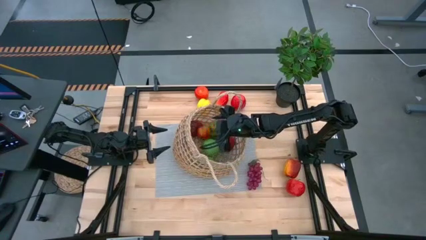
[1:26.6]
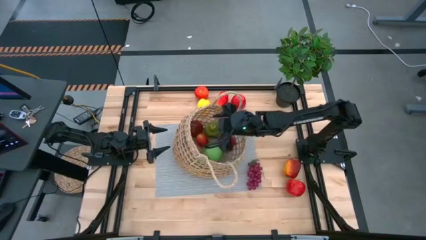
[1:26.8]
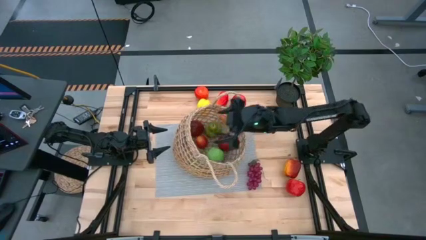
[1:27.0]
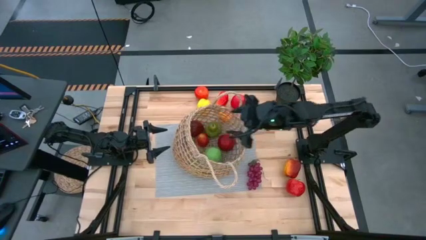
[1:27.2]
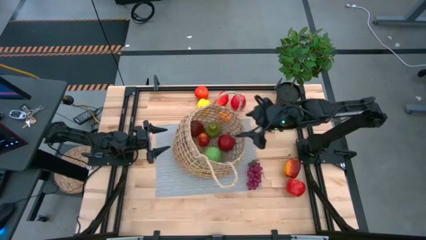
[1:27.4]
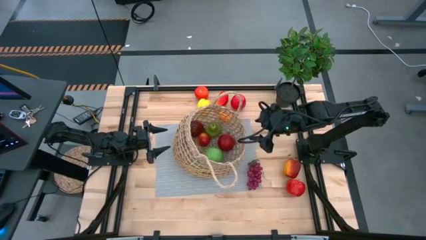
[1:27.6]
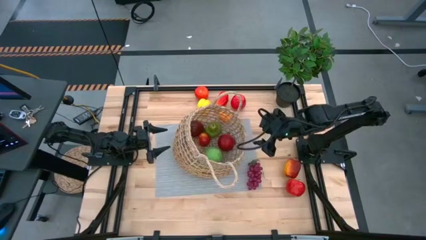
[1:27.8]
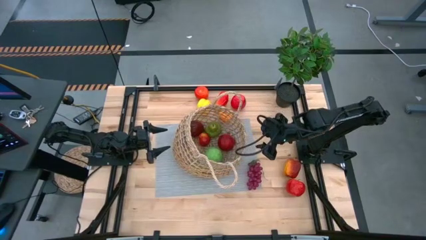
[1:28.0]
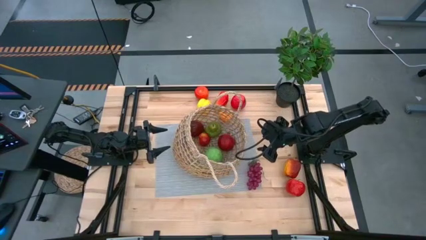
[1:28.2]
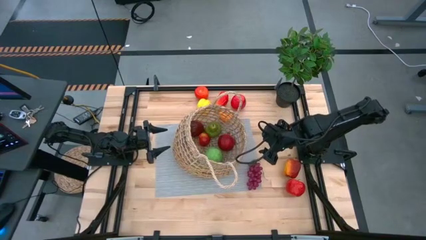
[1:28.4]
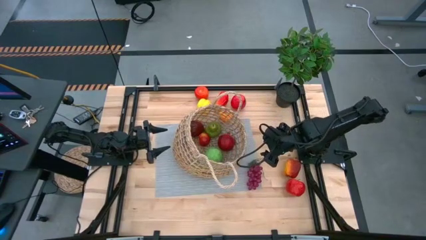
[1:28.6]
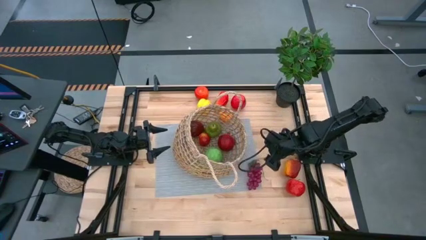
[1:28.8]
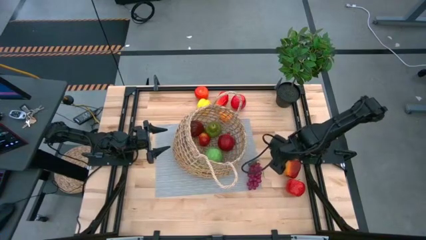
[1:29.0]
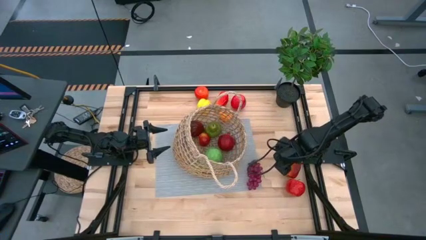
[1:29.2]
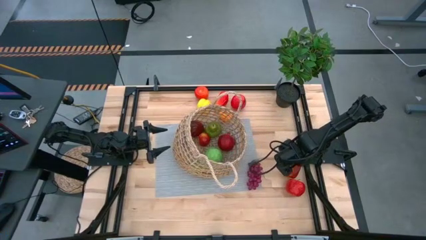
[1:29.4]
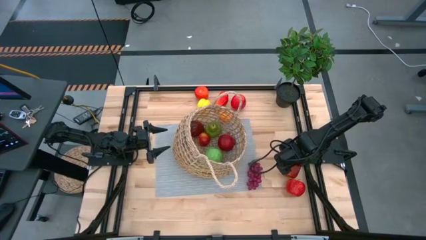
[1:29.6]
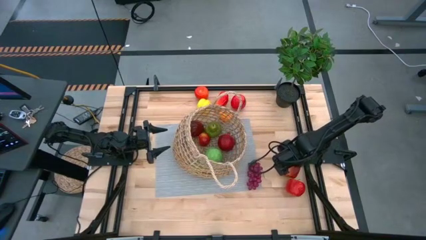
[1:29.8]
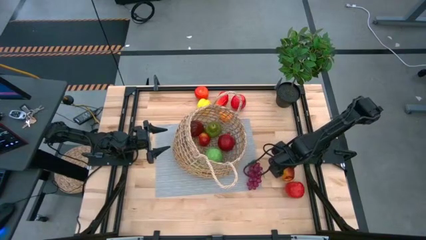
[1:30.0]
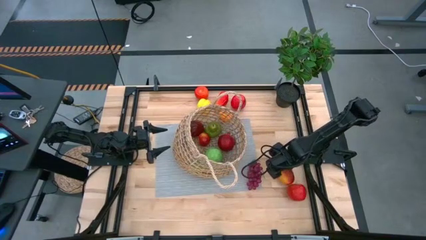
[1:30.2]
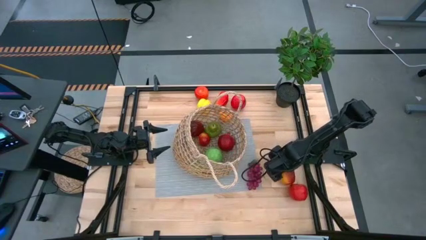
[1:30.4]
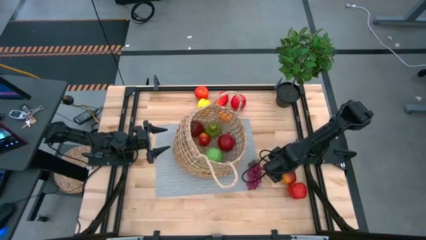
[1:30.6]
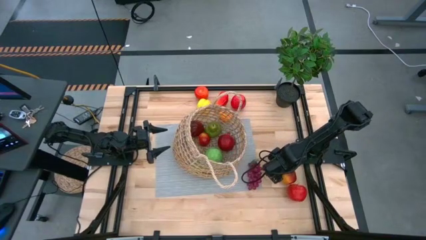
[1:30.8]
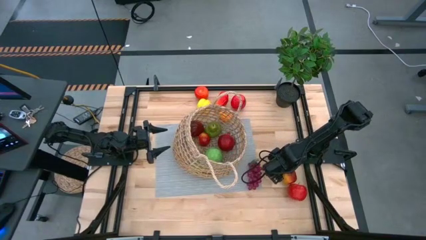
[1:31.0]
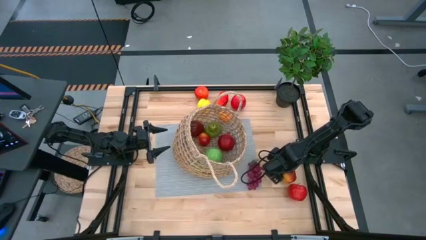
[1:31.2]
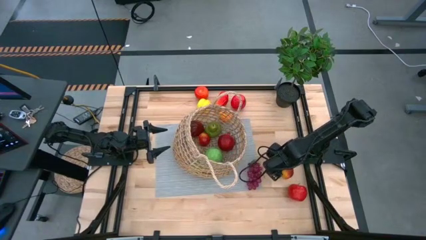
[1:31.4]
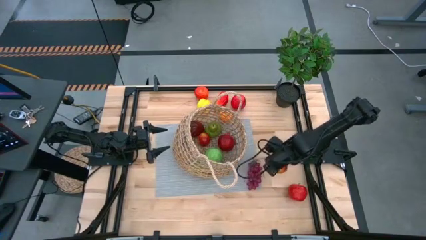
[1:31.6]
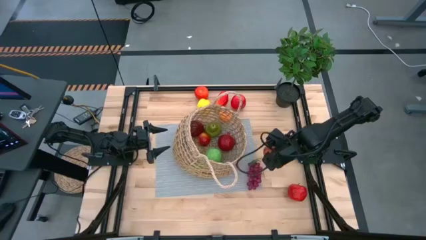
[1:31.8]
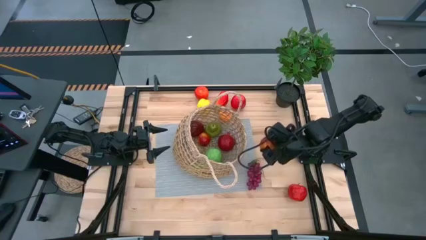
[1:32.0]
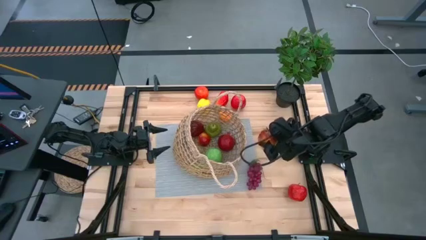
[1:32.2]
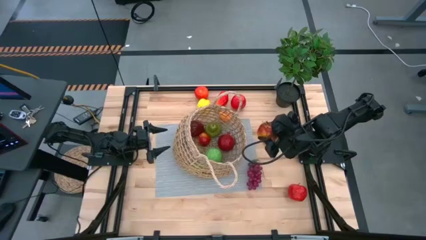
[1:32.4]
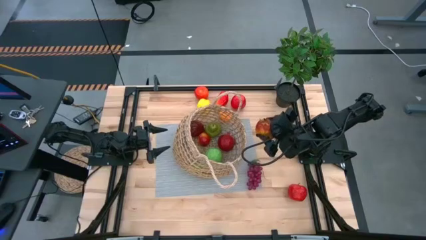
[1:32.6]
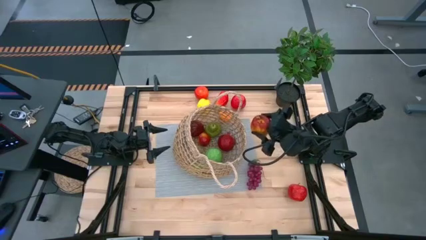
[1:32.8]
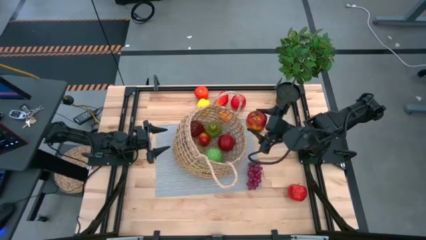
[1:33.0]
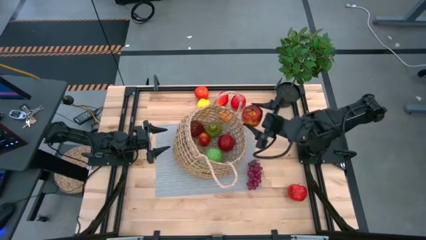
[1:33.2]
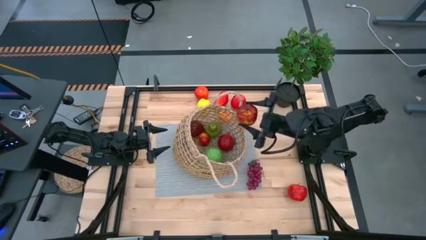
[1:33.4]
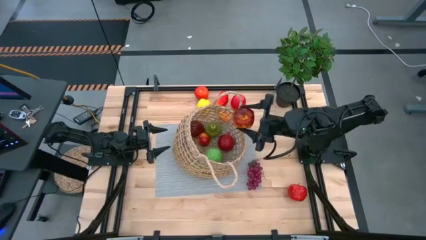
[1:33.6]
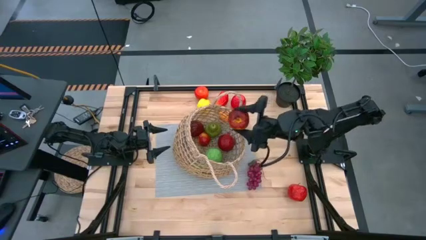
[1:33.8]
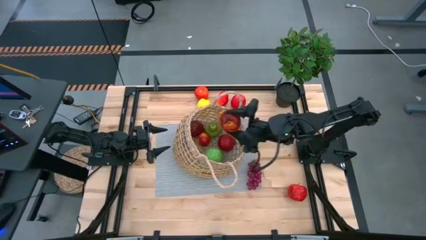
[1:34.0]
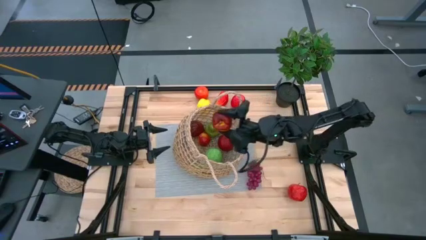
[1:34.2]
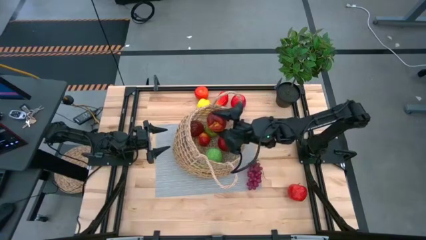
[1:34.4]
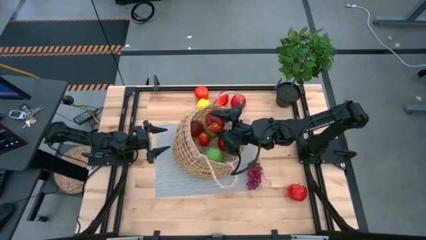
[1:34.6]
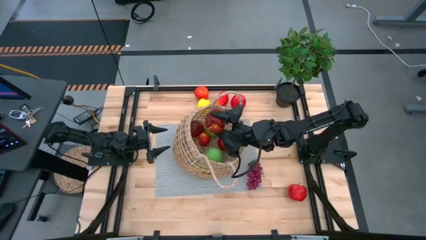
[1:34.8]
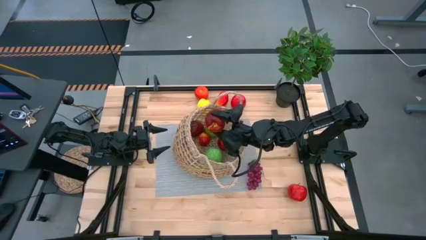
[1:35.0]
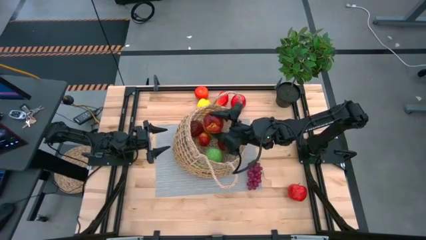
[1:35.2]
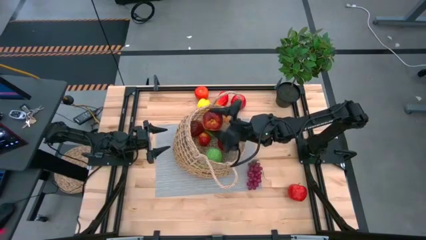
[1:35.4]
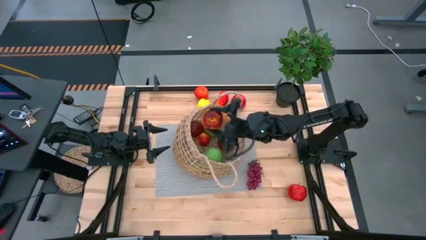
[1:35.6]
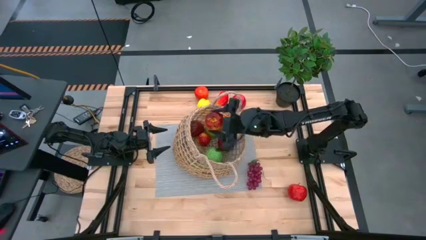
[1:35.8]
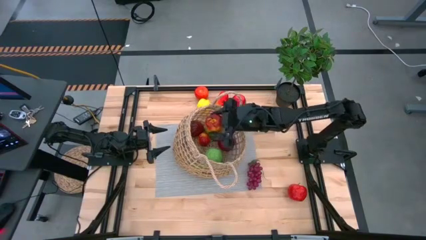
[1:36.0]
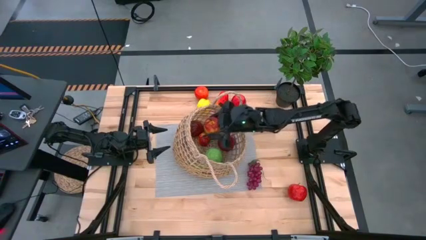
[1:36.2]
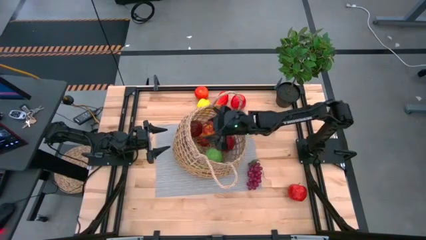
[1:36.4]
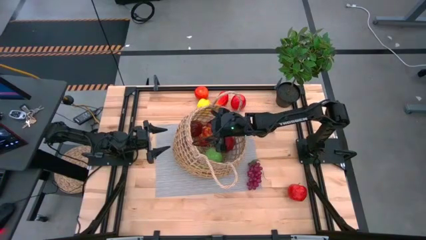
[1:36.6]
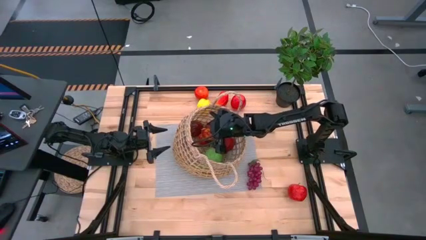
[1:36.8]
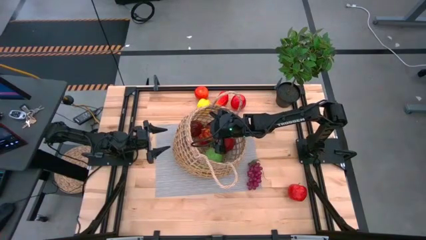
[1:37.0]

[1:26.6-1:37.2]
Task: Build produce basket
Put the center right red apple into the mesh basket

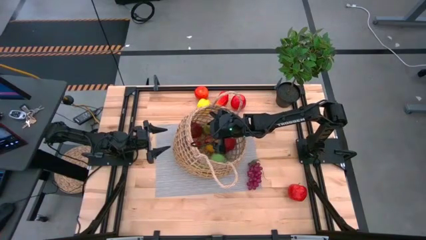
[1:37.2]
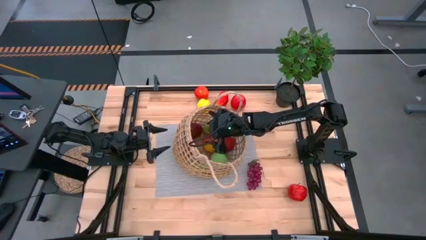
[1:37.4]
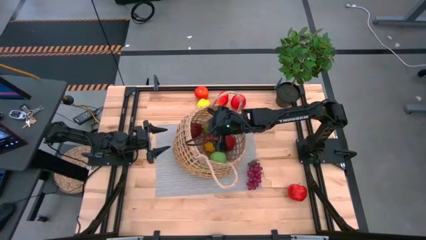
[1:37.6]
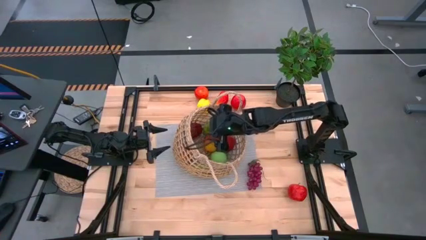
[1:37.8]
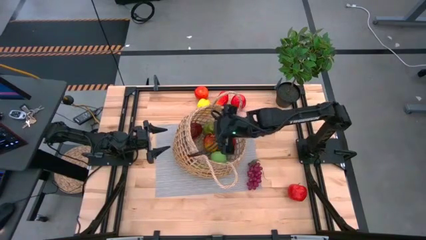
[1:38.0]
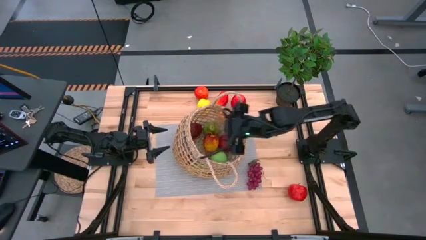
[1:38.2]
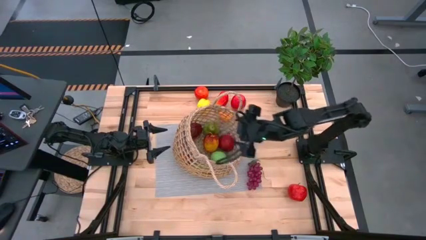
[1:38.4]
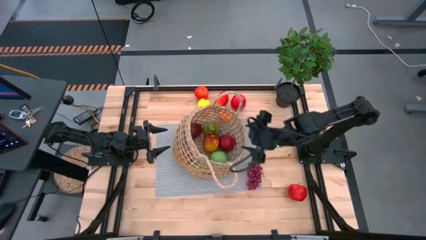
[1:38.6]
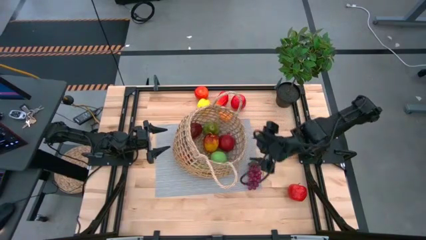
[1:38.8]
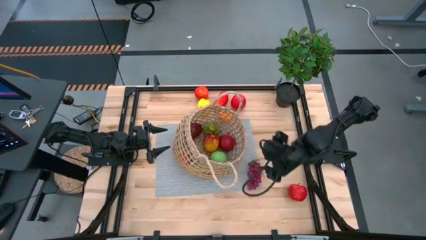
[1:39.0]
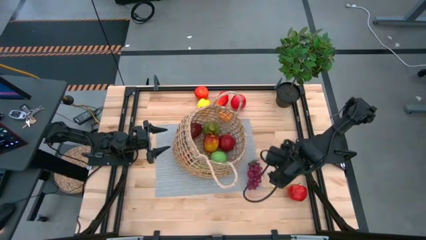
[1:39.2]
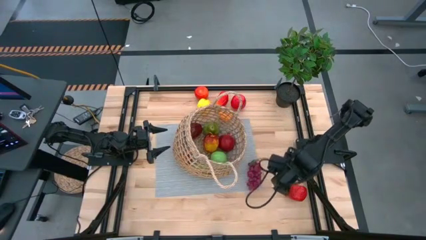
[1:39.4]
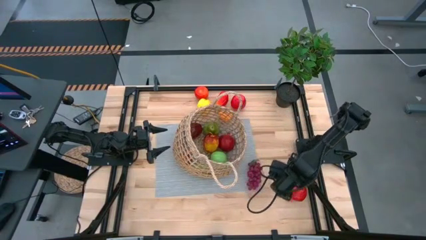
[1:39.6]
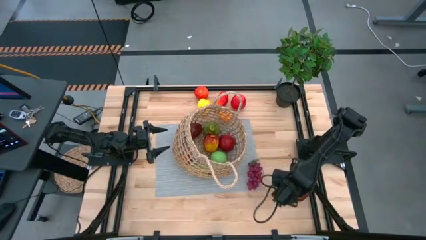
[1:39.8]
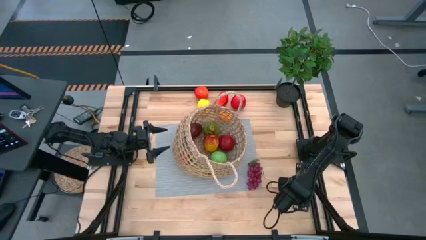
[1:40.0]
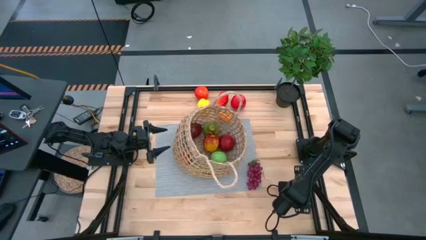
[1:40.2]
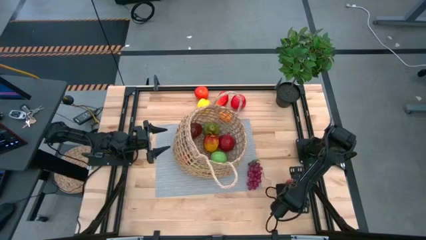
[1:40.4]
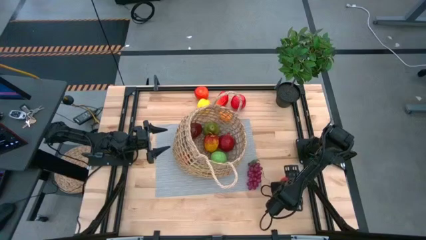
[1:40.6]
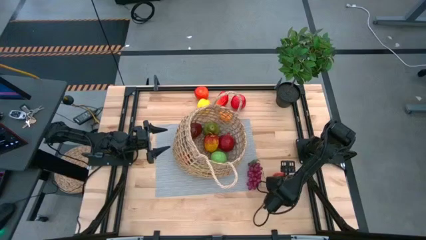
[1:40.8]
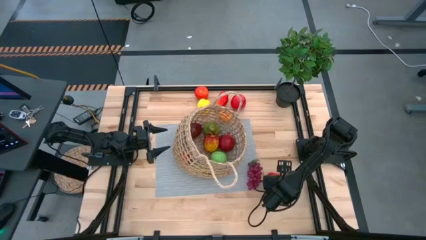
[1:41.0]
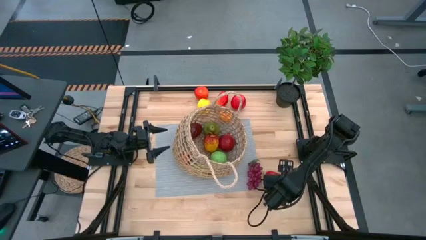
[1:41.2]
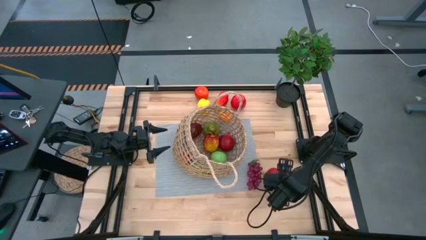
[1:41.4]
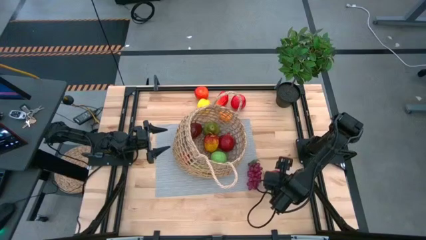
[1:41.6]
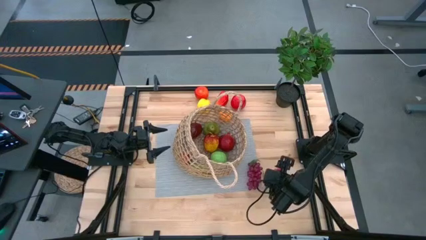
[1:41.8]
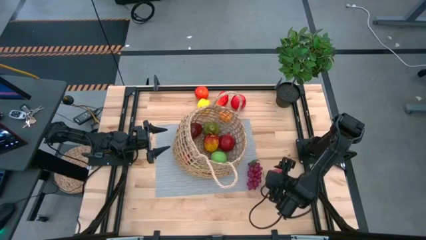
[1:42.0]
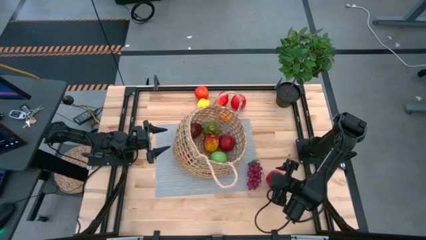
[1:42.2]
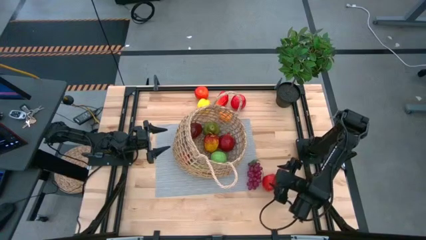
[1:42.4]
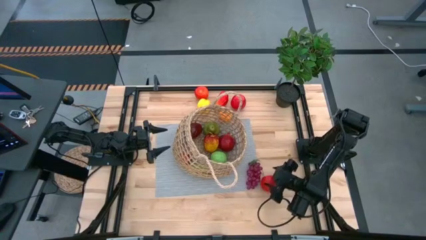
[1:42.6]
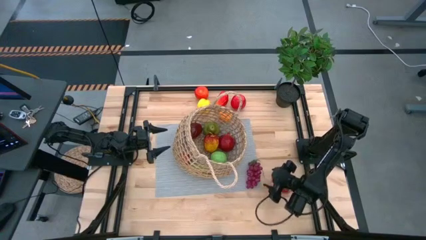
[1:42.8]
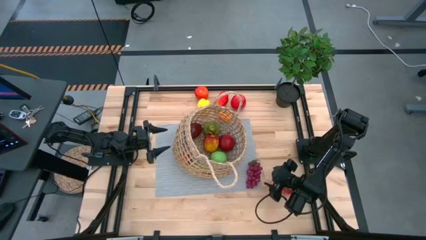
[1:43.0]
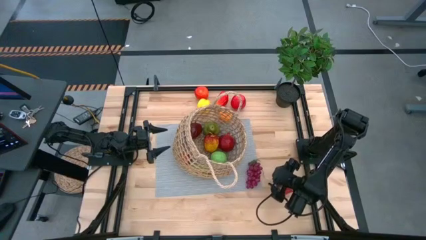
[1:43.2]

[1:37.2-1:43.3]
Put the bottom red apple into the mesh basket
